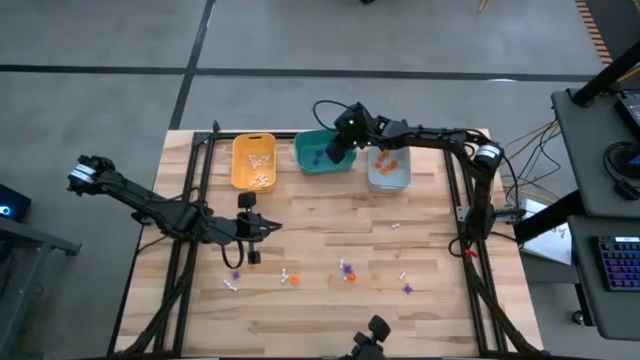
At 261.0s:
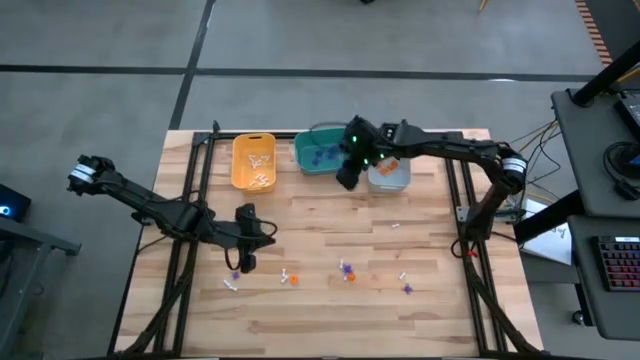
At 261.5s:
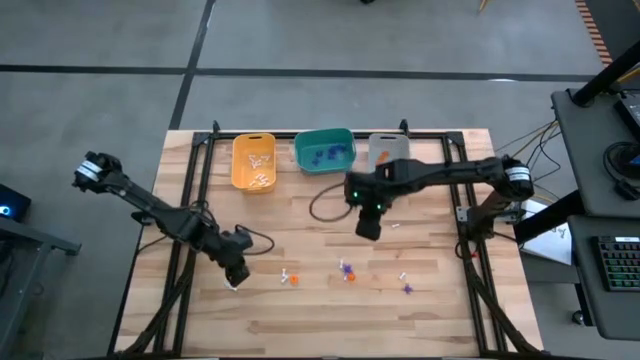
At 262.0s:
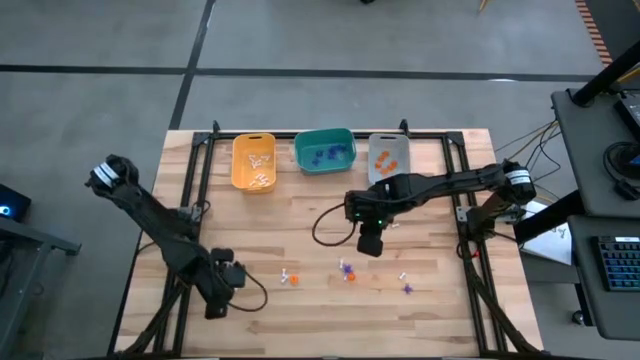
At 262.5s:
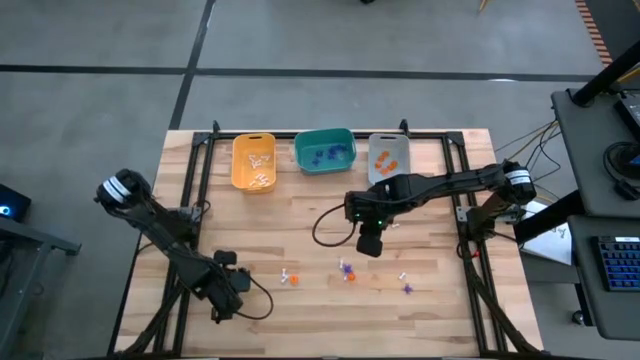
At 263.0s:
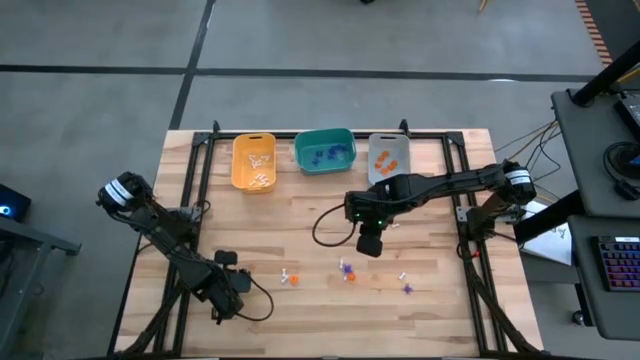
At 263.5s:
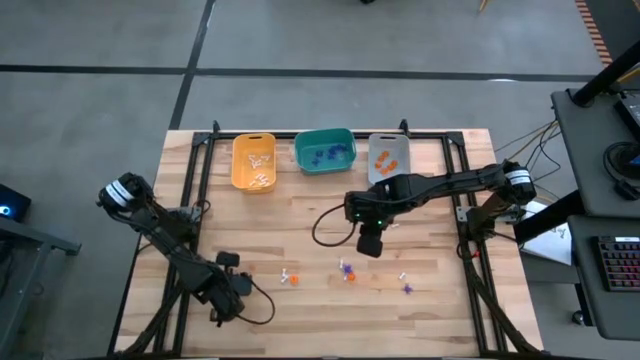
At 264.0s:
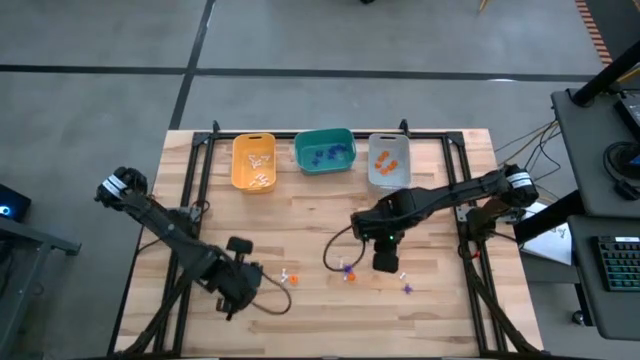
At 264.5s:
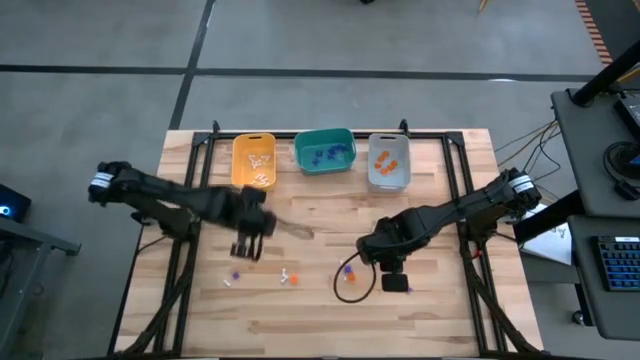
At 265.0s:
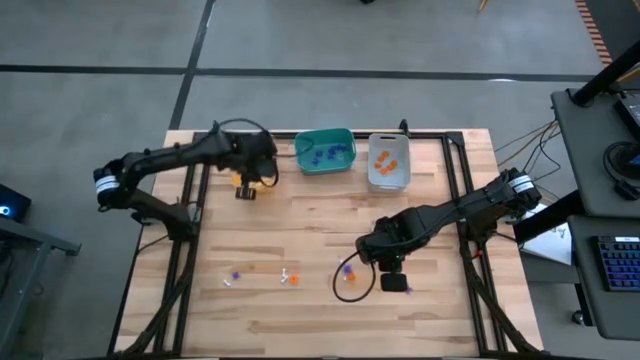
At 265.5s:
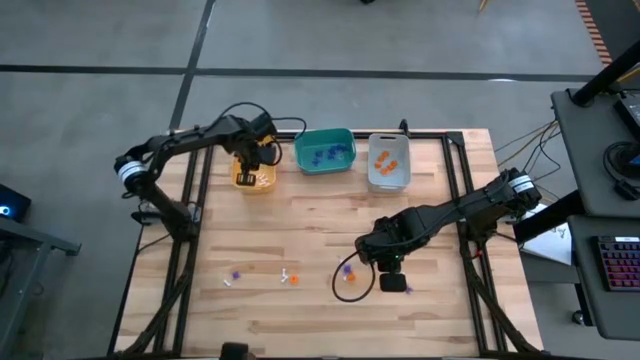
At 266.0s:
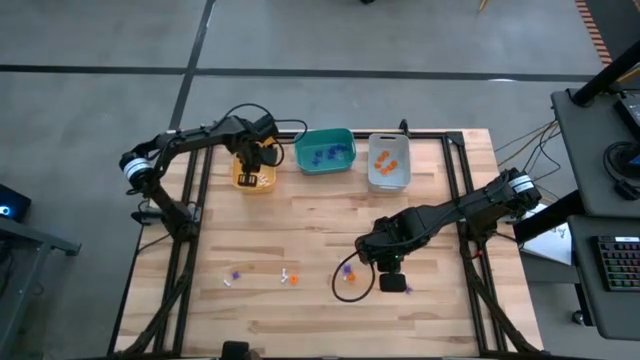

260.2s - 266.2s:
Task: Sort Halloween decoration
Put the white bone toy into the yellow bin

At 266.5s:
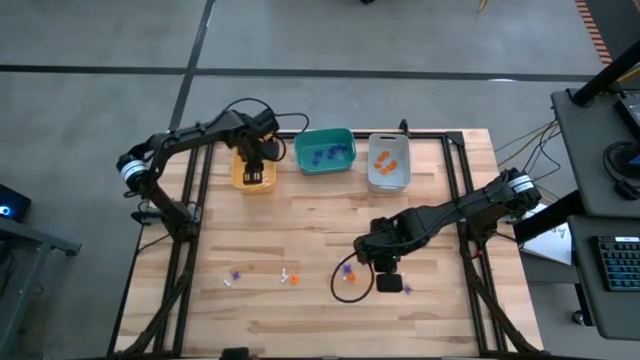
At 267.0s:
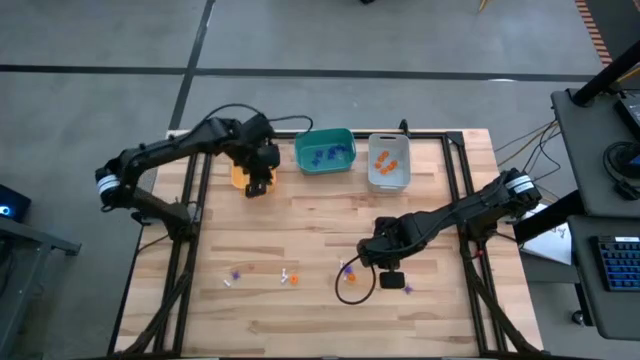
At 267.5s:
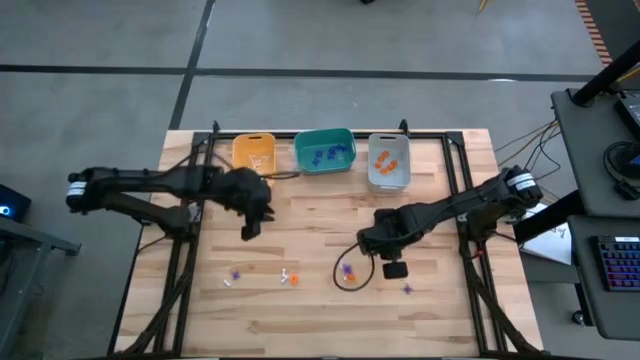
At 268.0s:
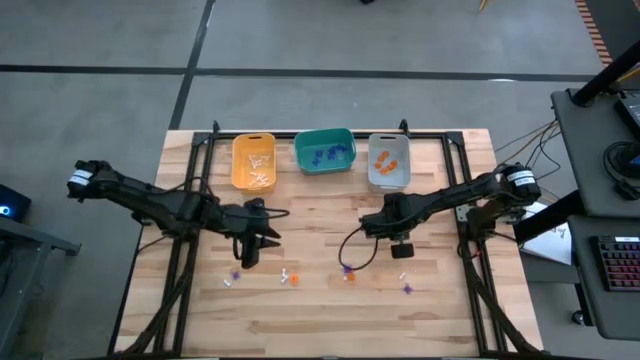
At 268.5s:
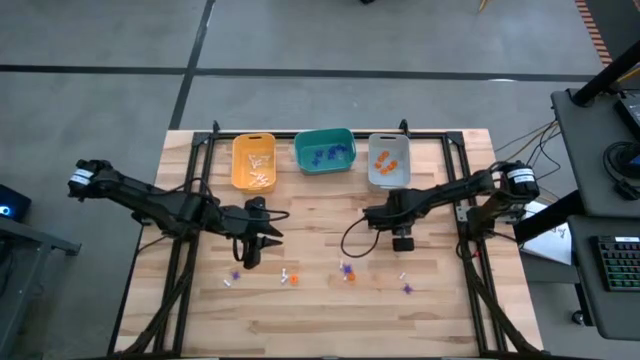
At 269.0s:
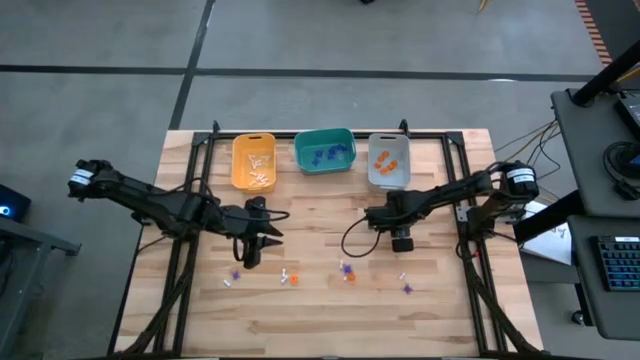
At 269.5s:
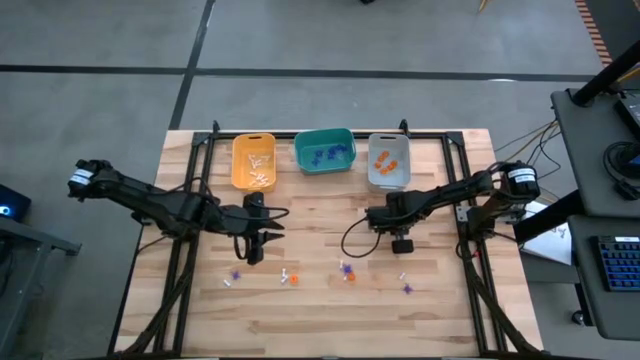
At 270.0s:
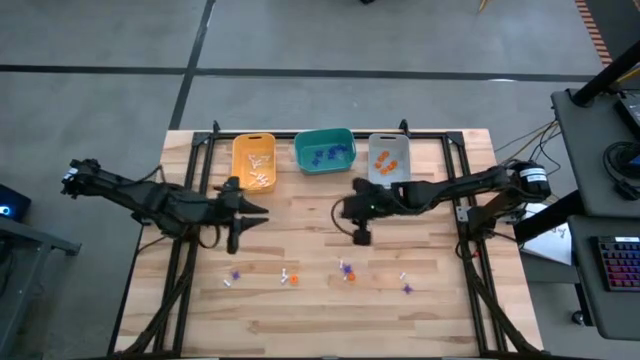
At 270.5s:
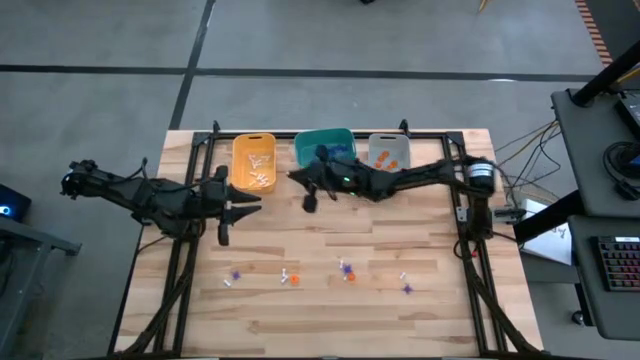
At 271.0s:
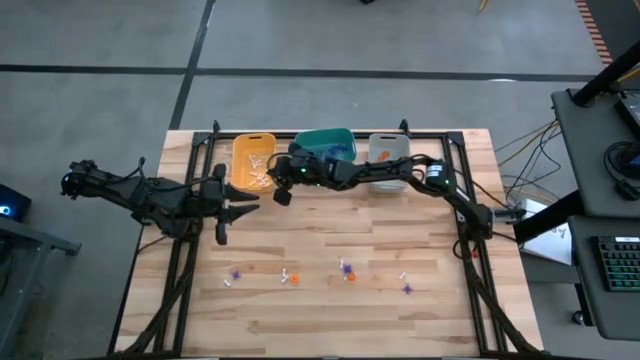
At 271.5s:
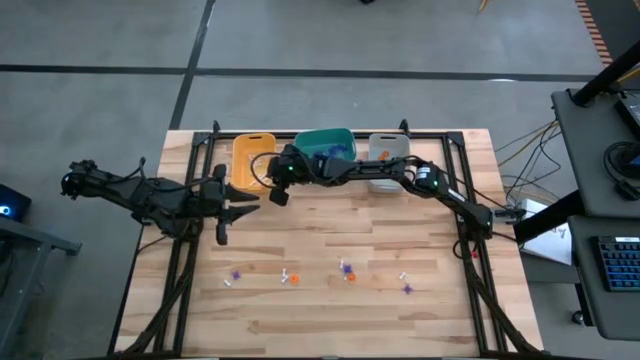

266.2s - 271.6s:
Put the white bone toy into the yellow bin

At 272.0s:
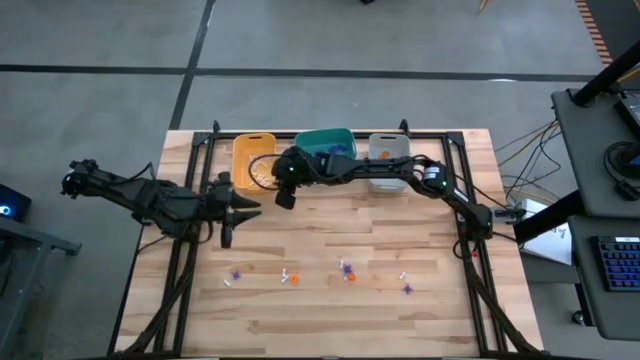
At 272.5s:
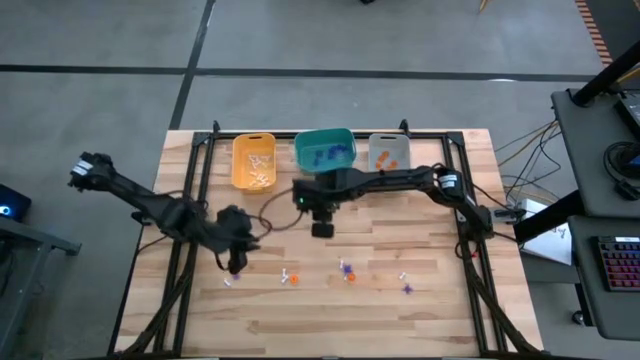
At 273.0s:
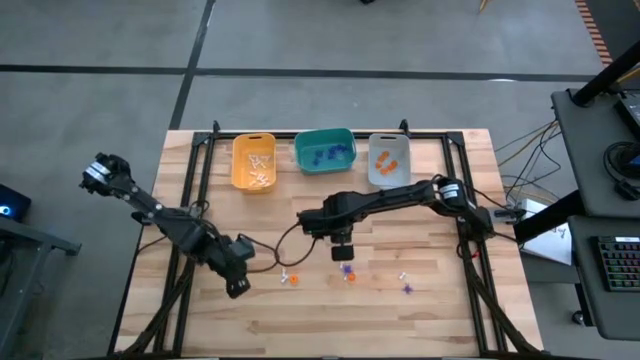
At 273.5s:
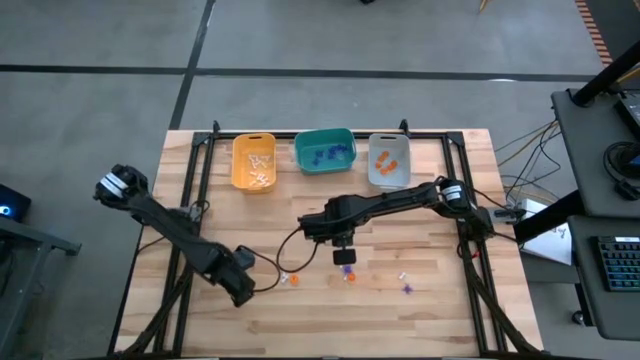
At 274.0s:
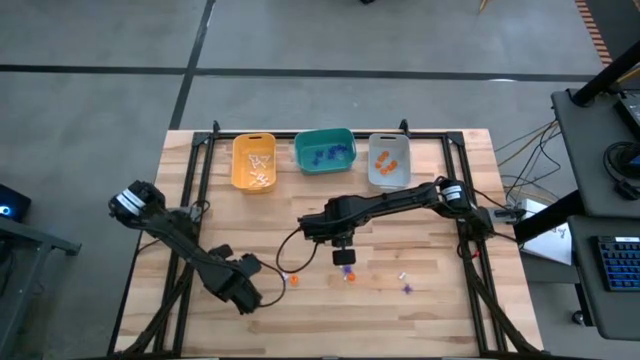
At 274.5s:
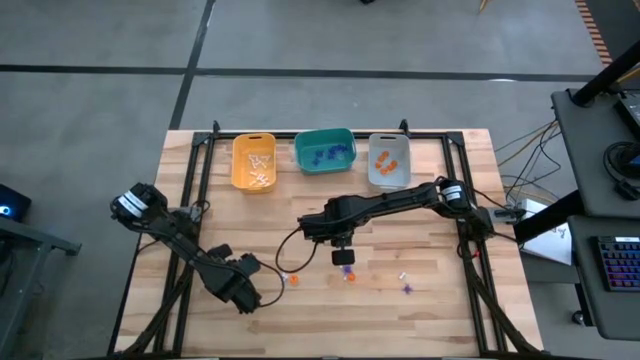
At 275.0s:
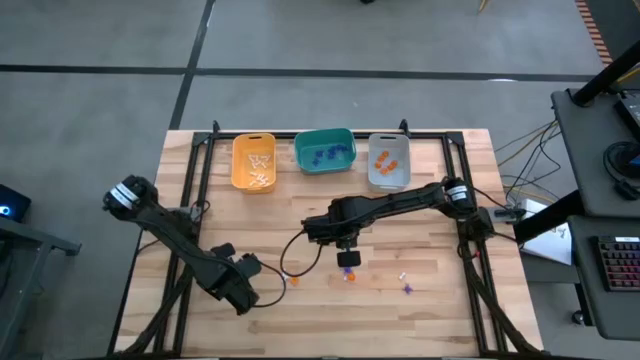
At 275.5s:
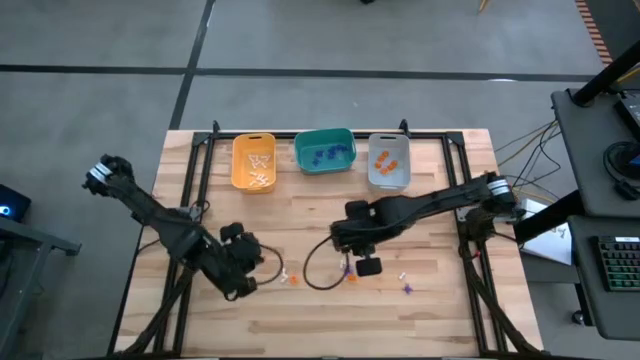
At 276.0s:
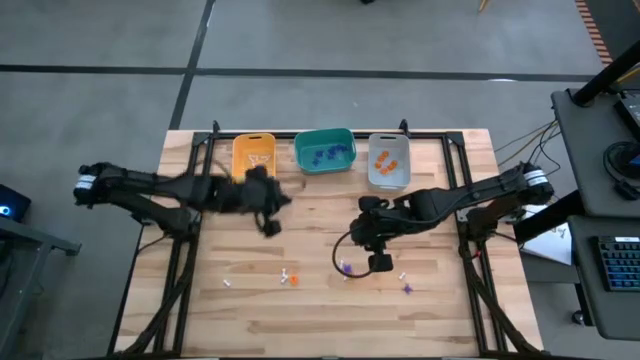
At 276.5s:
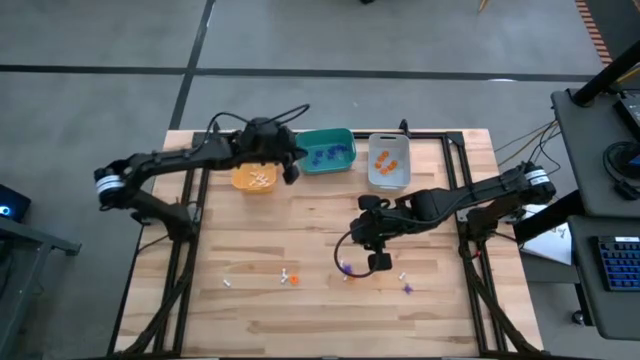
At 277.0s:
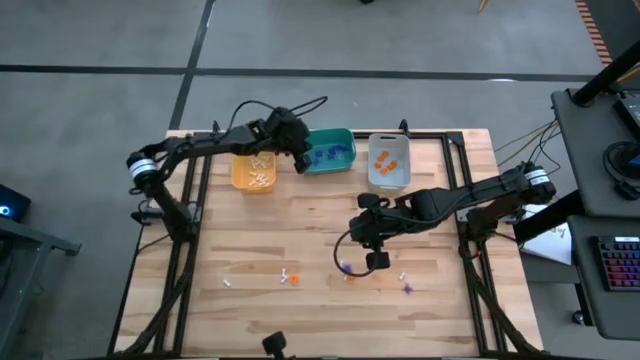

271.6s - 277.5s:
Put the violet spider toy into the green bin

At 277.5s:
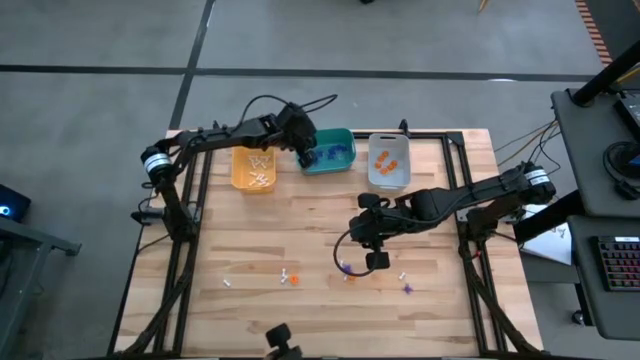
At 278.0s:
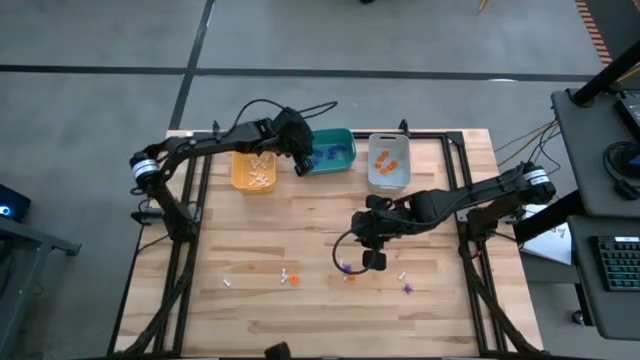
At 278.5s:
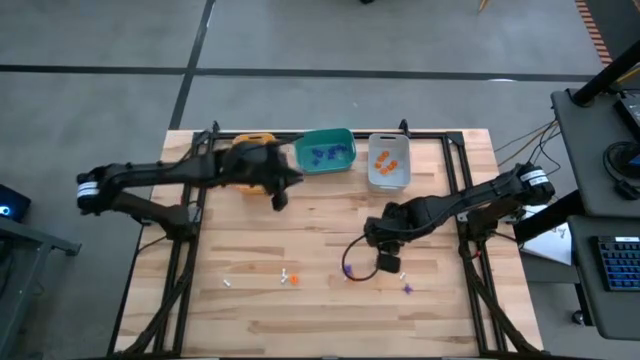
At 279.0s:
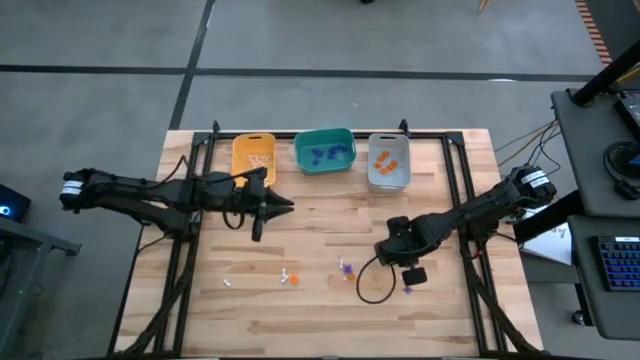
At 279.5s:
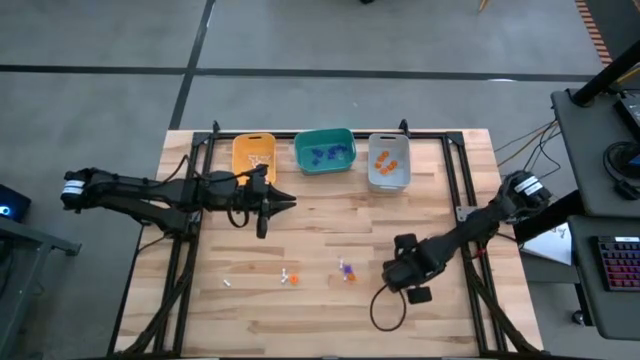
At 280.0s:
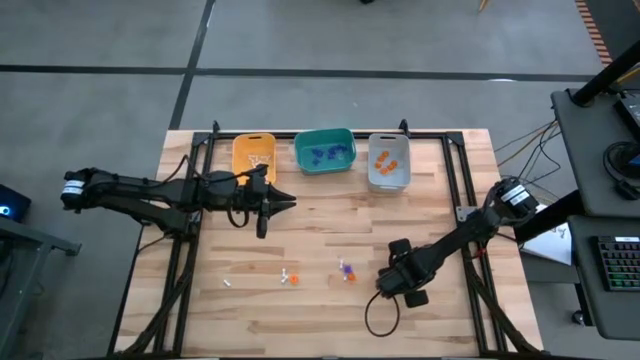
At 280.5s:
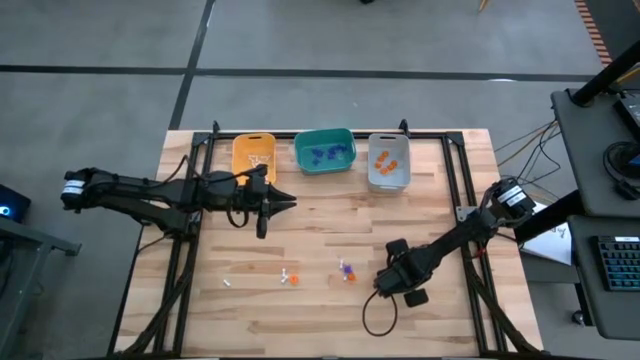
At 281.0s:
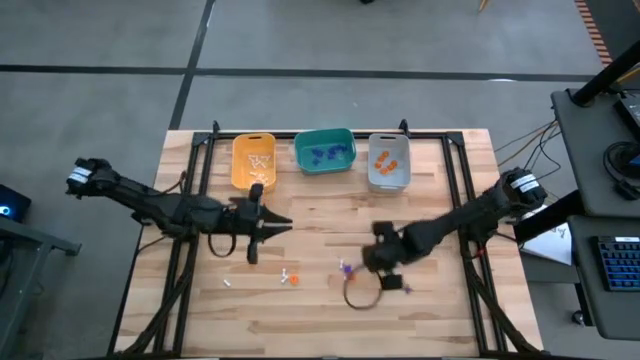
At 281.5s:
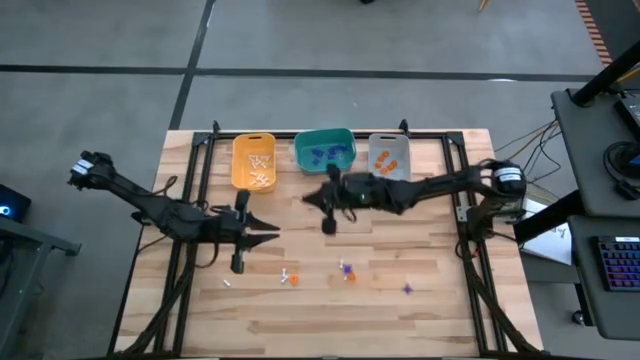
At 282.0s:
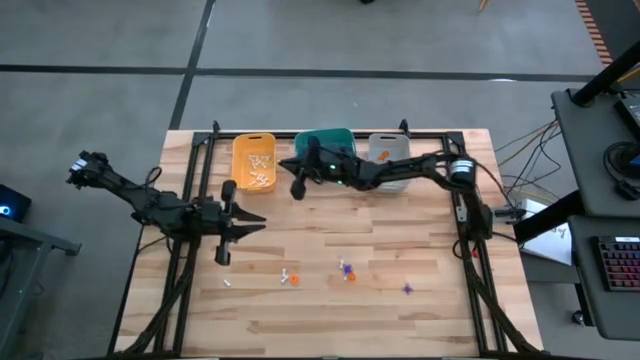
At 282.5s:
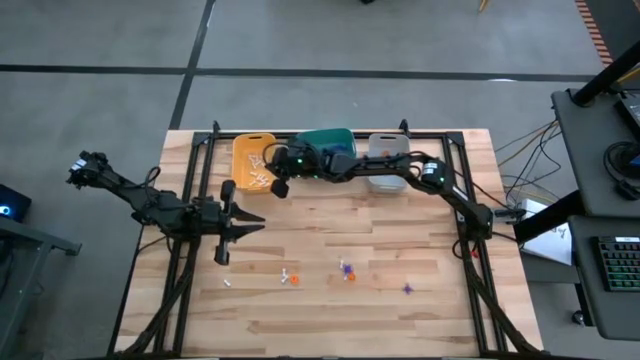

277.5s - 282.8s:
Put the white bone toy into the yellow bin
